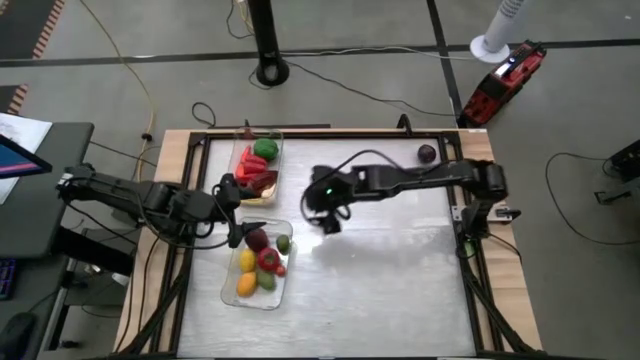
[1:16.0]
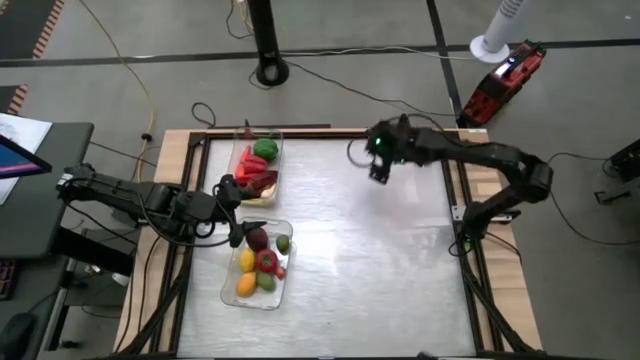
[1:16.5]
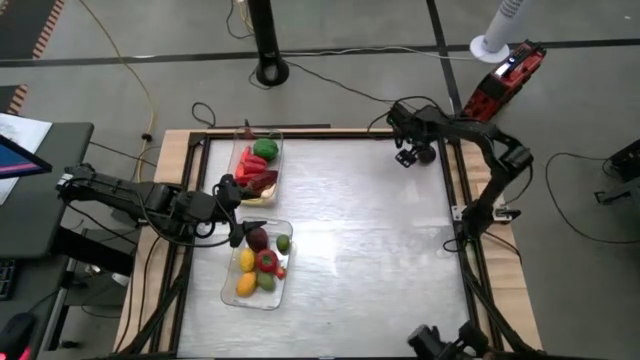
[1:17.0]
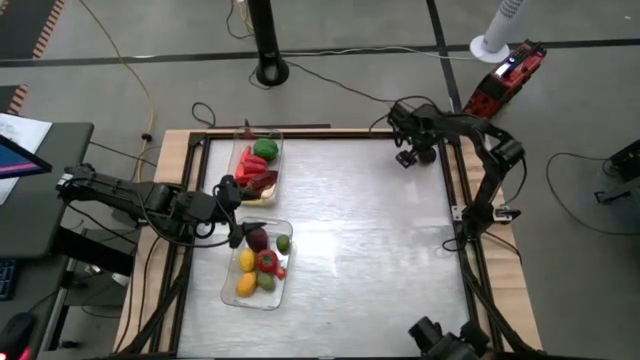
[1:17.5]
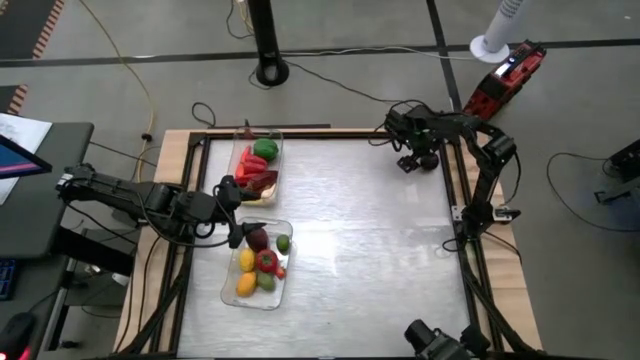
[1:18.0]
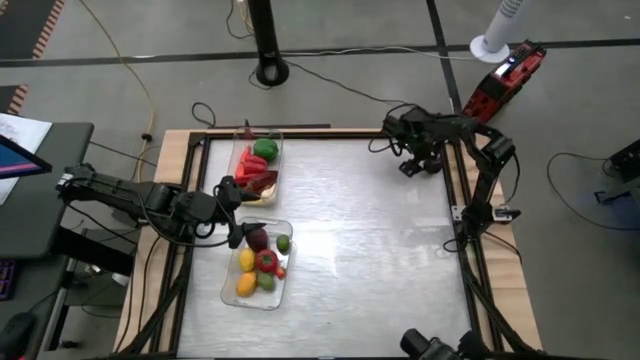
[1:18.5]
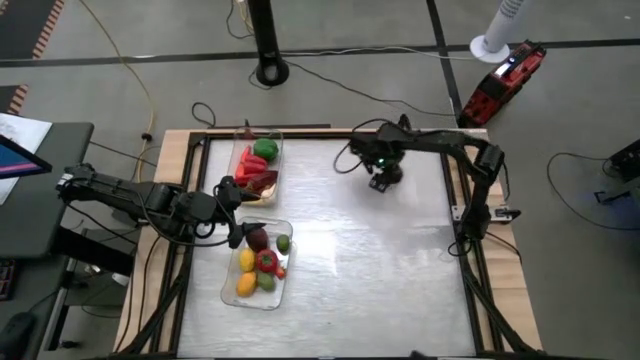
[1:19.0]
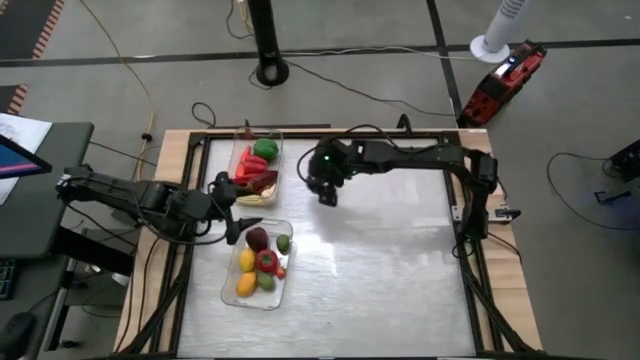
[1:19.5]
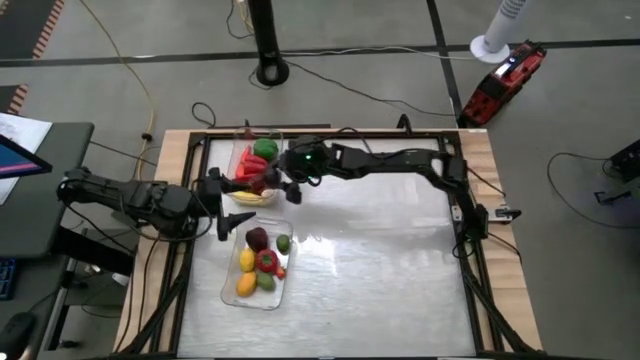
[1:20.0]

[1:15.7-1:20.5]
Task: Sort produce into baskets
Put the plum into the top transparent bin

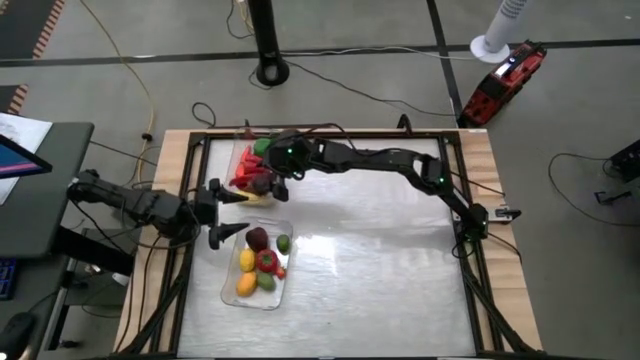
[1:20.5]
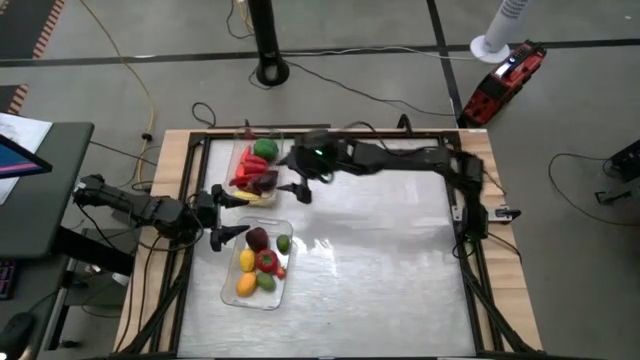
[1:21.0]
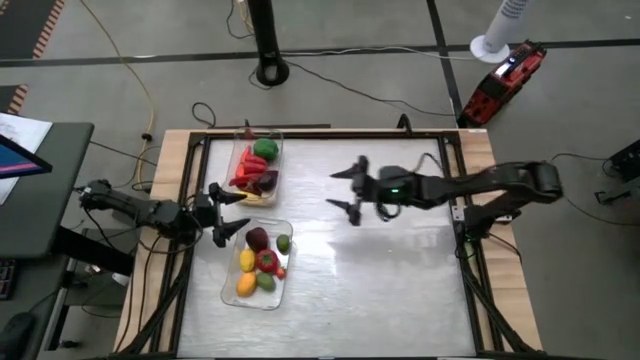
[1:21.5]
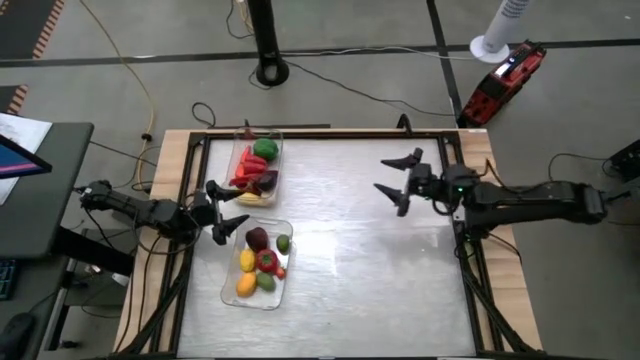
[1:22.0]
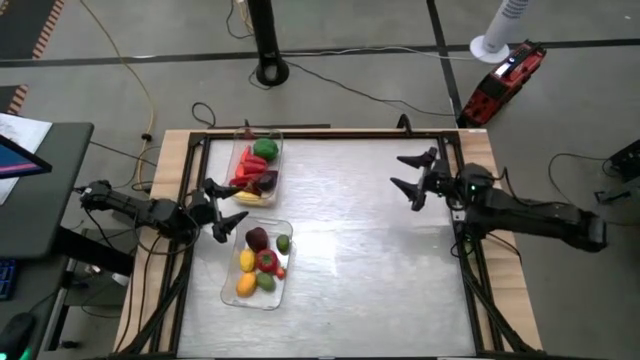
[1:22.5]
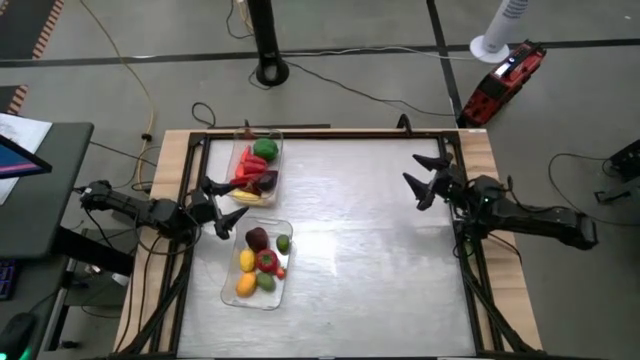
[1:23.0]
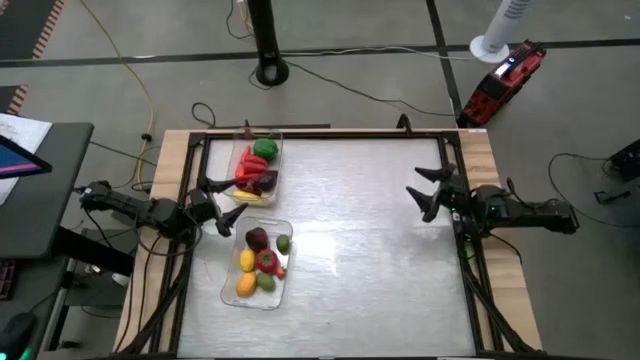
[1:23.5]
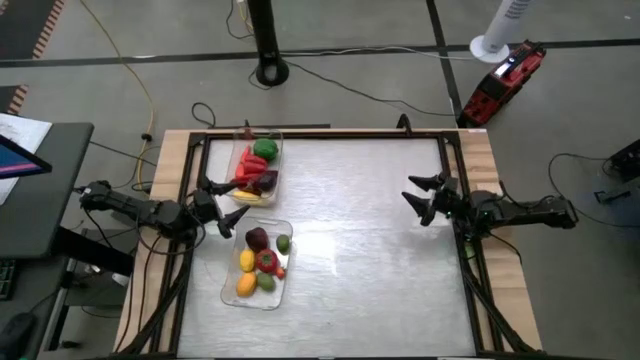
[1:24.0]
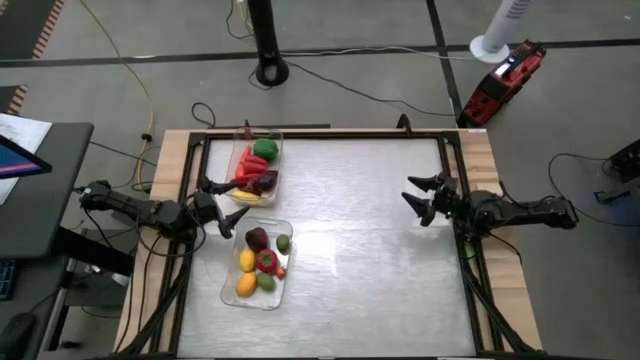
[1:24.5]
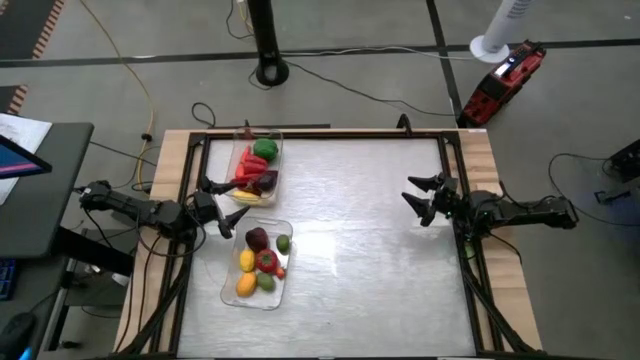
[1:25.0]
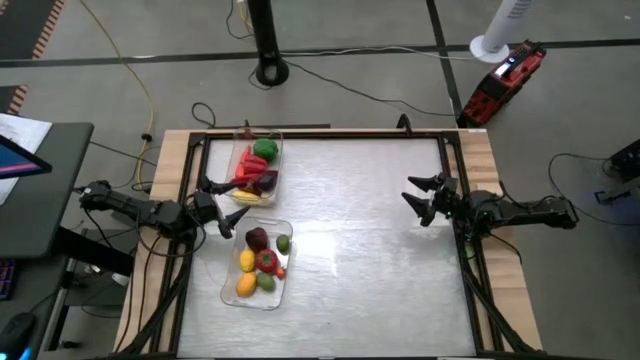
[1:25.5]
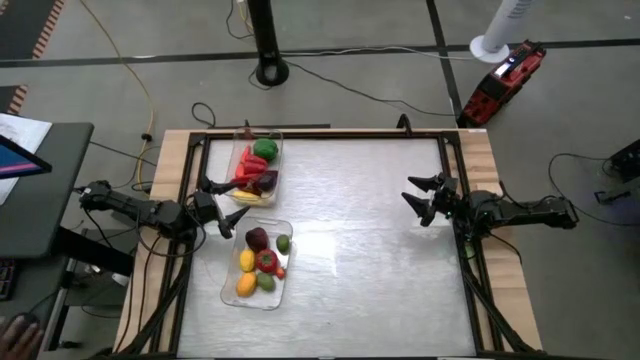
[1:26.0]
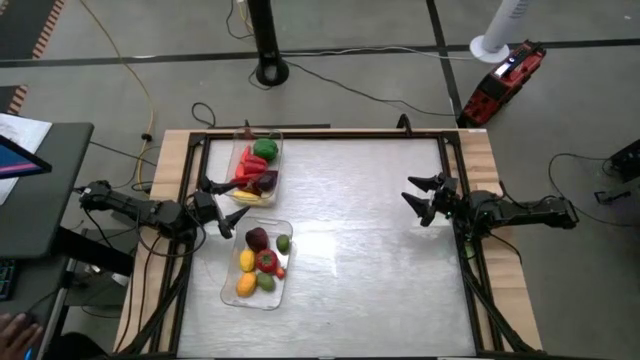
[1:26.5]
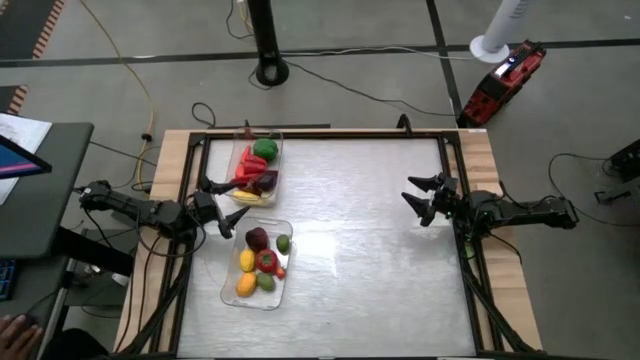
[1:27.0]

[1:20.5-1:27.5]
Return to Home Position

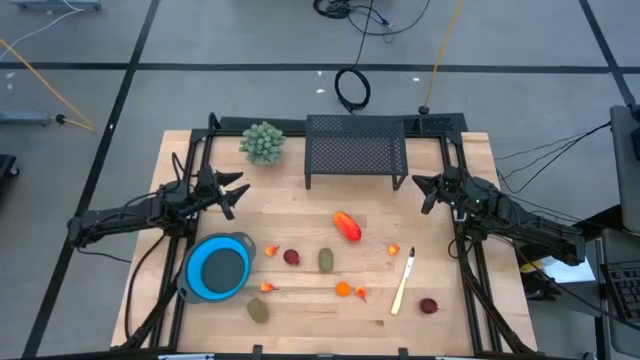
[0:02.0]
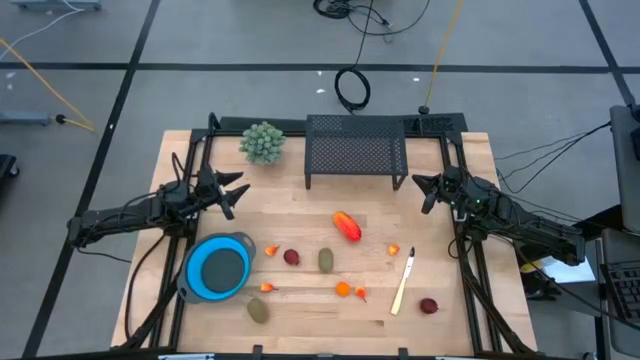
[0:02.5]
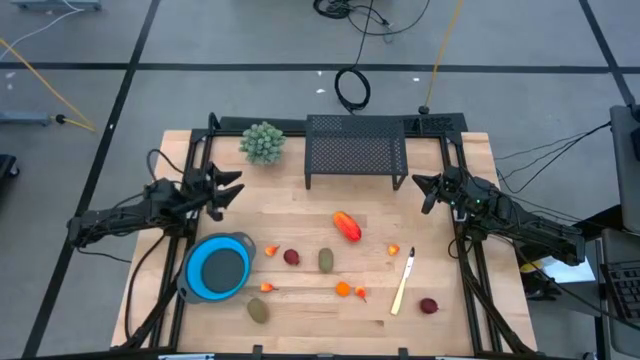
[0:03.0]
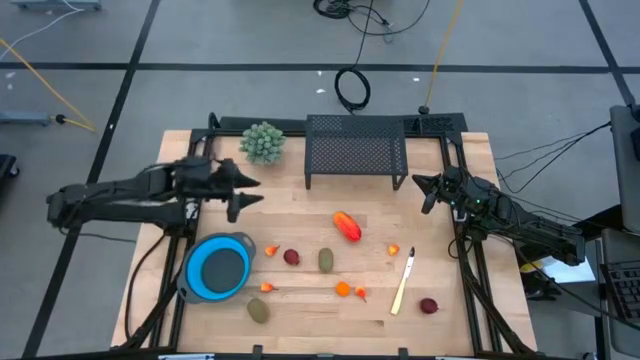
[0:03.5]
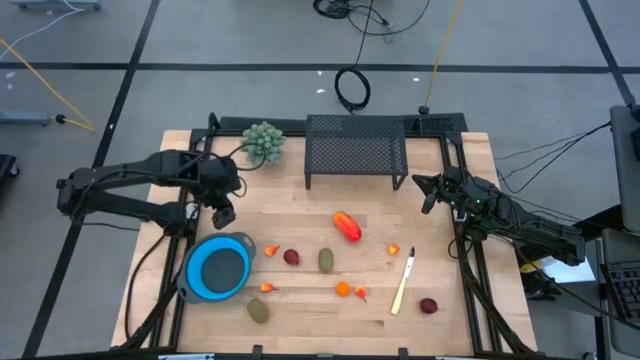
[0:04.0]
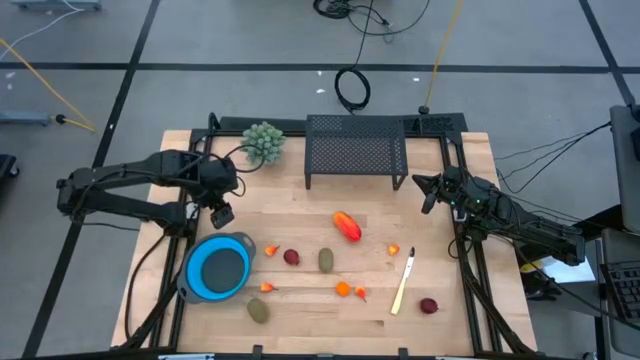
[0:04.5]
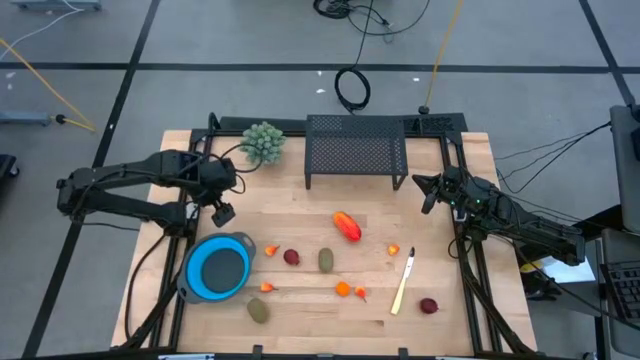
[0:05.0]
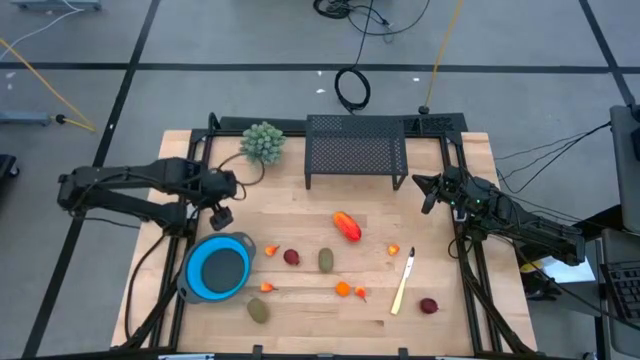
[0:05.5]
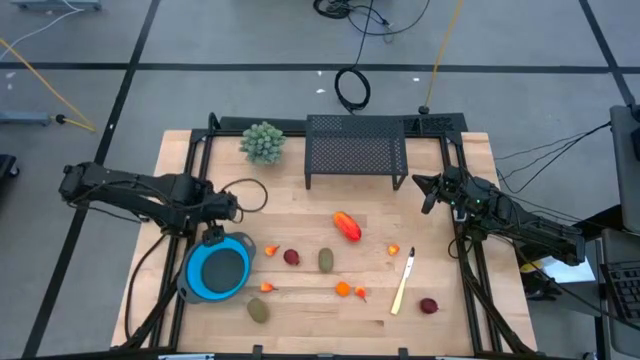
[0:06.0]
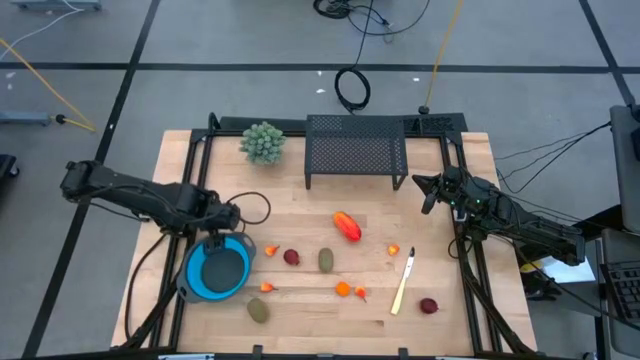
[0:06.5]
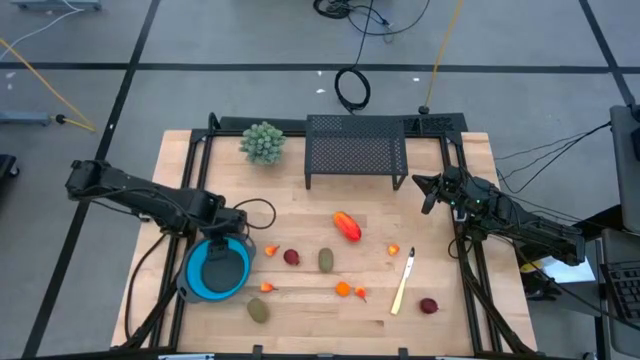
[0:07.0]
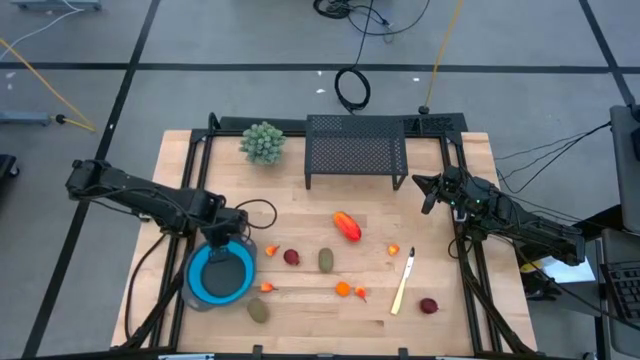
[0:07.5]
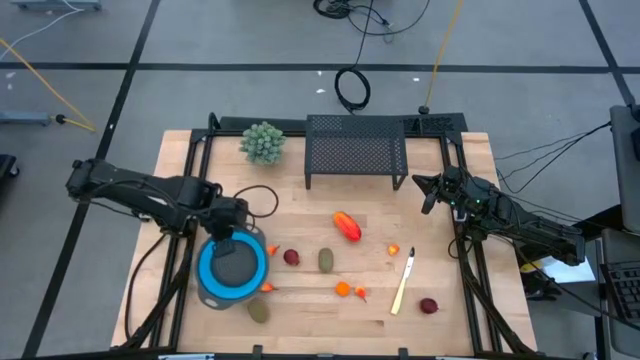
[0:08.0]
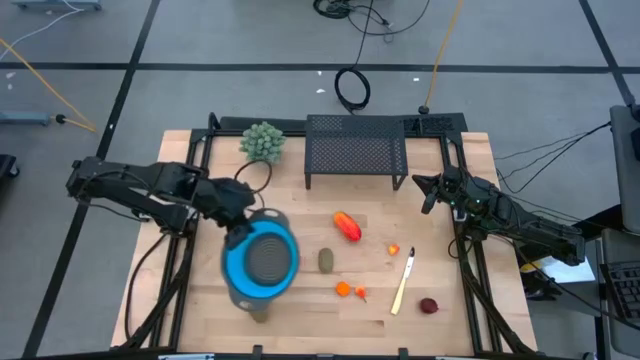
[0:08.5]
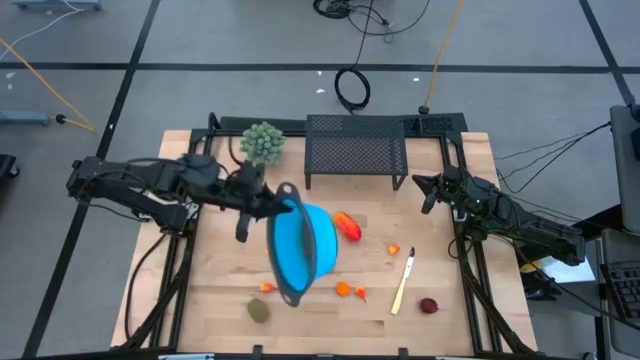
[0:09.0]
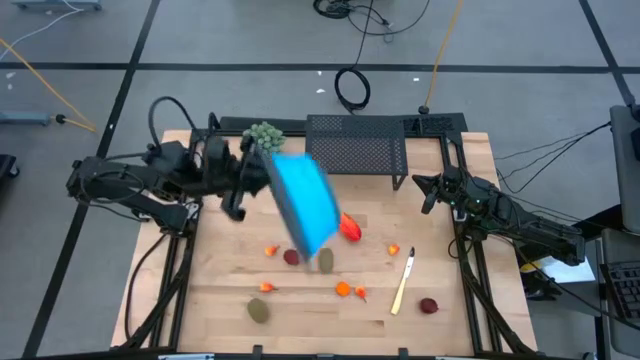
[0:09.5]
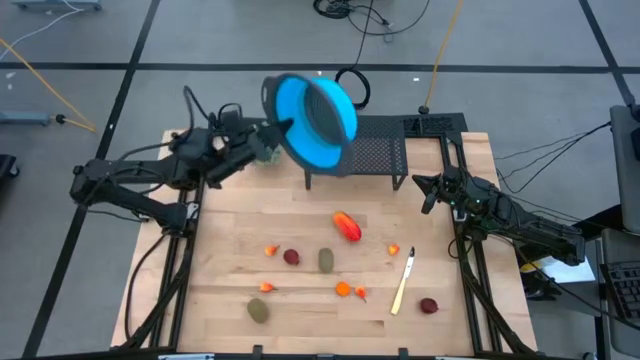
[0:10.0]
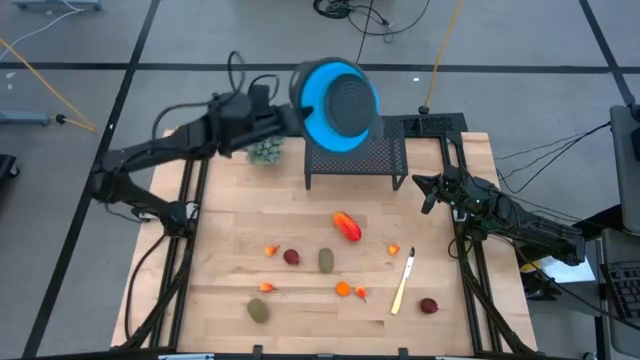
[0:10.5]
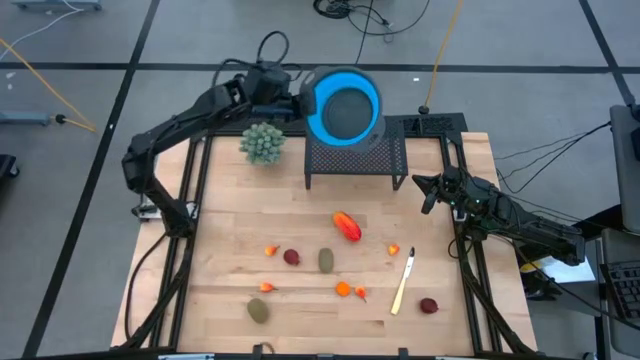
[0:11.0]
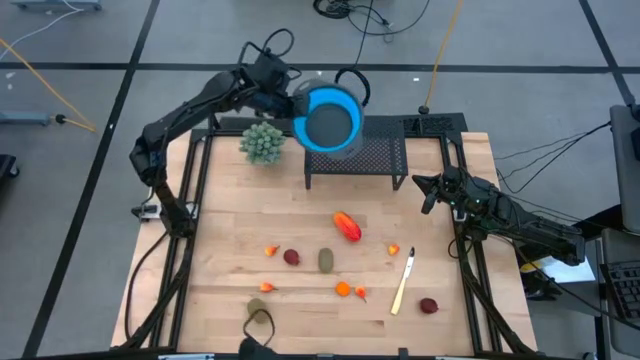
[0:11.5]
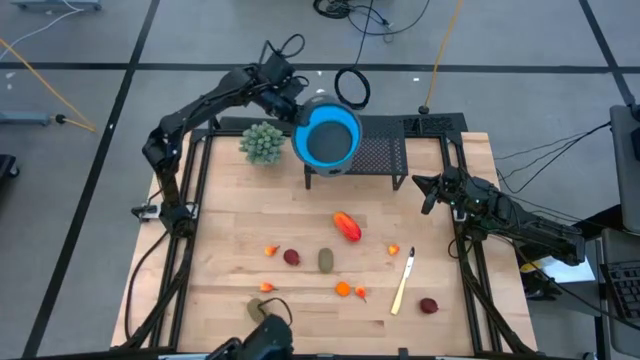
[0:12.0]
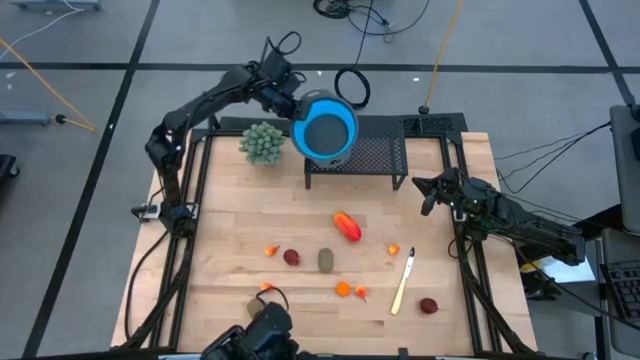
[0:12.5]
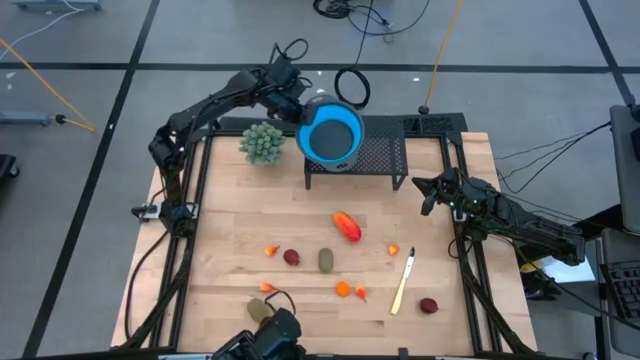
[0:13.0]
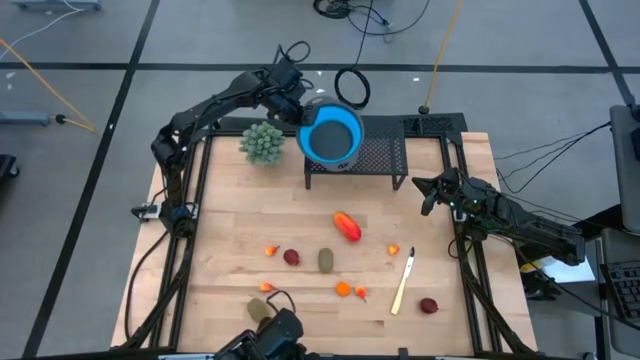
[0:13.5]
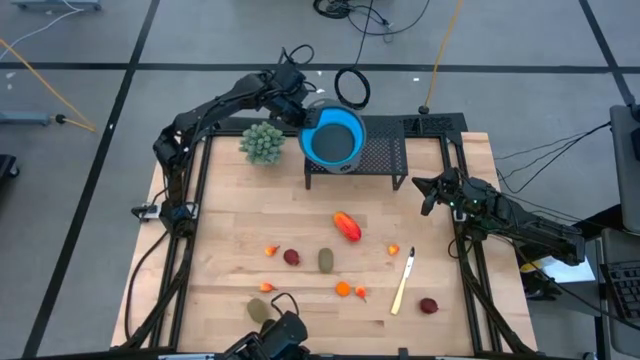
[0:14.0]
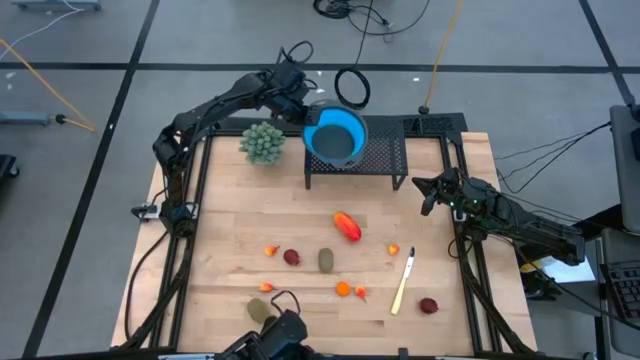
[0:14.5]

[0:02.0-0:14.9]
Task: Pick & Place Fruit
Put the blue strainer on the shelf
